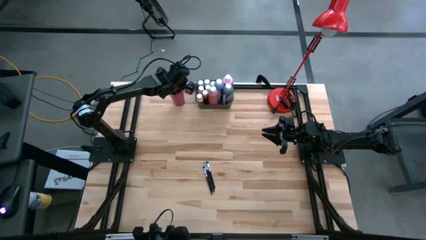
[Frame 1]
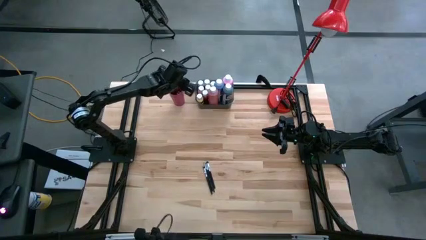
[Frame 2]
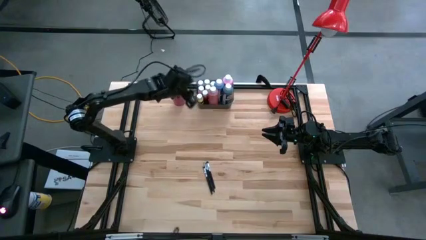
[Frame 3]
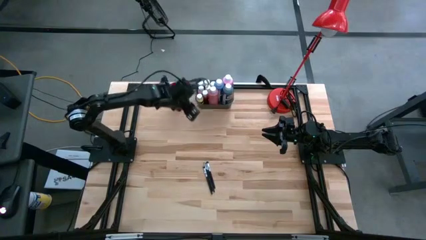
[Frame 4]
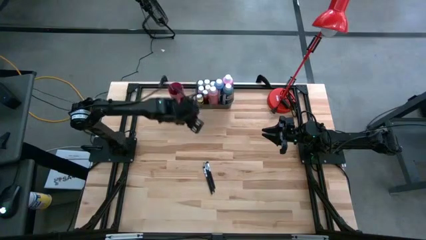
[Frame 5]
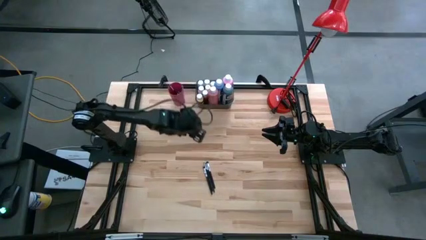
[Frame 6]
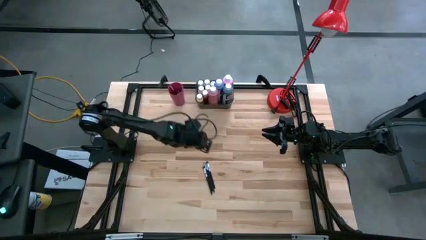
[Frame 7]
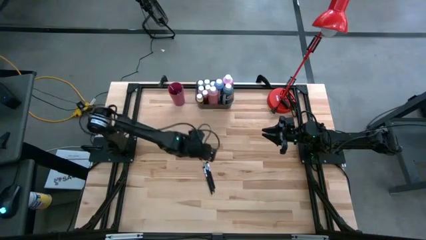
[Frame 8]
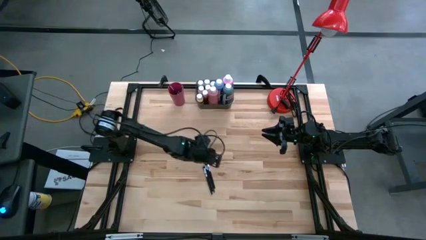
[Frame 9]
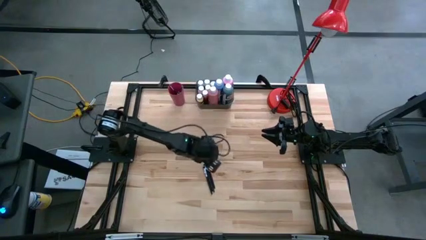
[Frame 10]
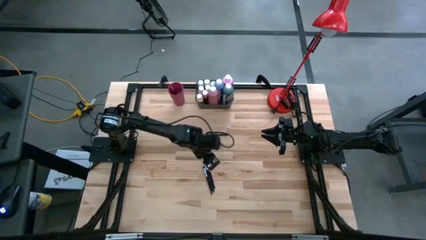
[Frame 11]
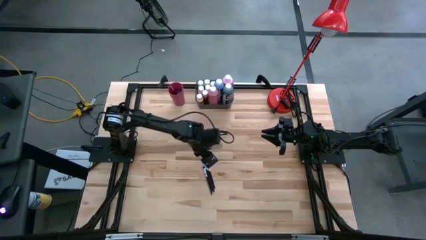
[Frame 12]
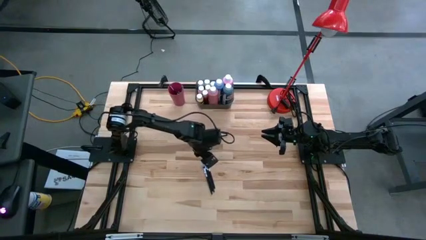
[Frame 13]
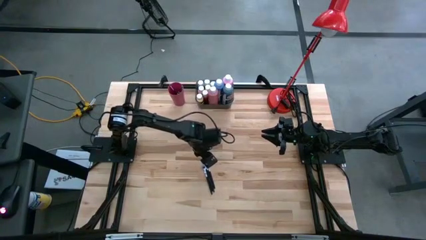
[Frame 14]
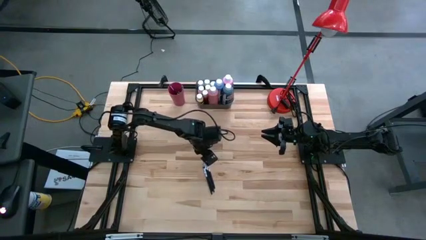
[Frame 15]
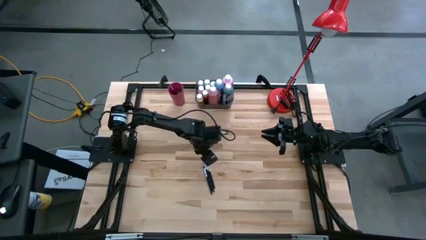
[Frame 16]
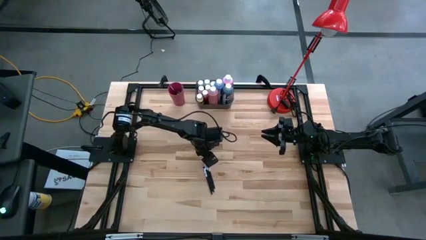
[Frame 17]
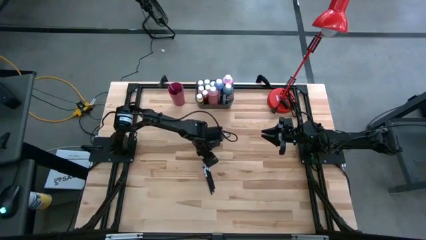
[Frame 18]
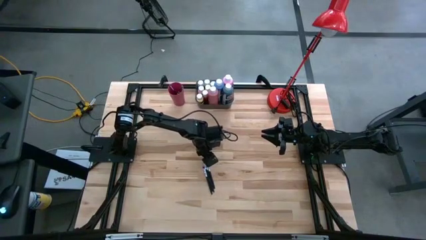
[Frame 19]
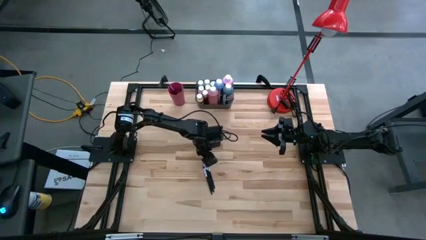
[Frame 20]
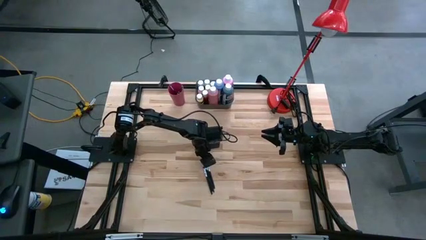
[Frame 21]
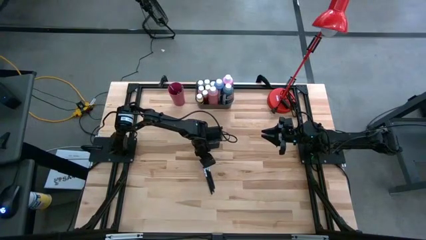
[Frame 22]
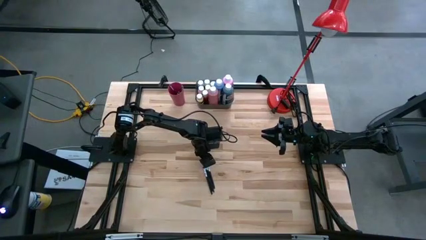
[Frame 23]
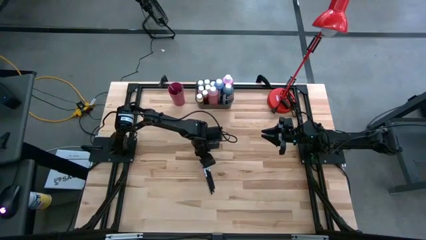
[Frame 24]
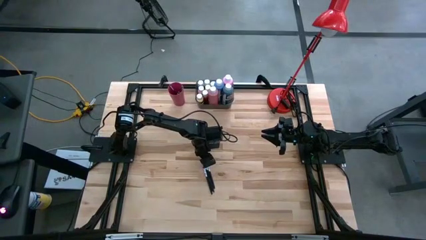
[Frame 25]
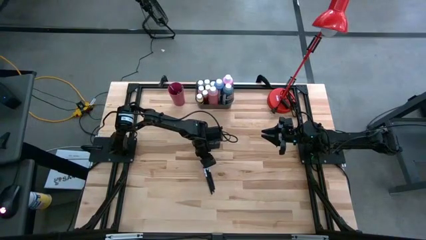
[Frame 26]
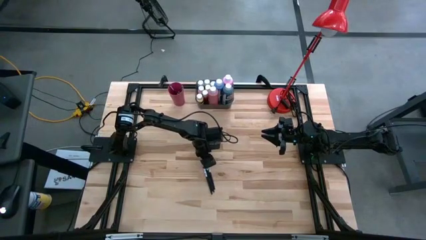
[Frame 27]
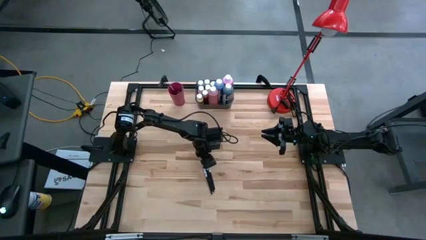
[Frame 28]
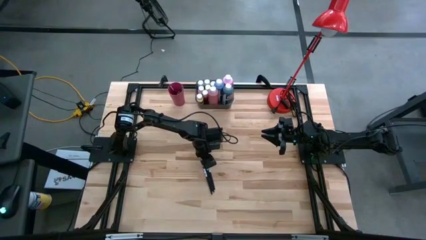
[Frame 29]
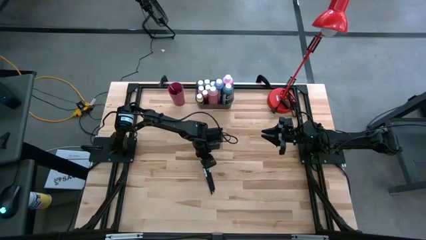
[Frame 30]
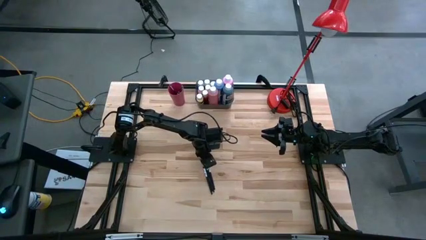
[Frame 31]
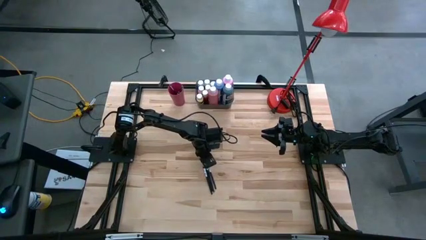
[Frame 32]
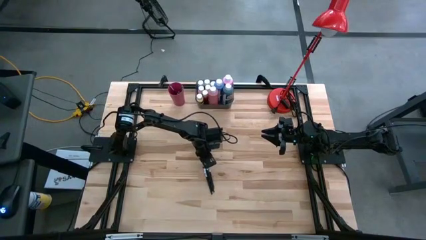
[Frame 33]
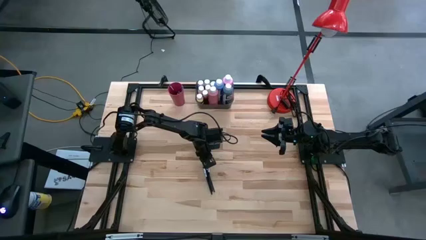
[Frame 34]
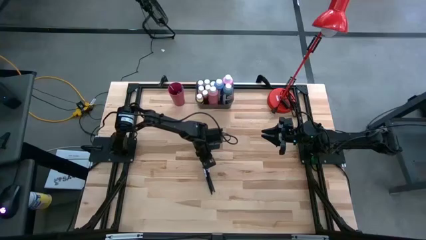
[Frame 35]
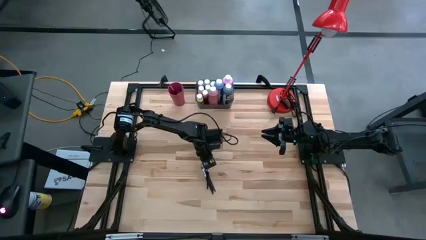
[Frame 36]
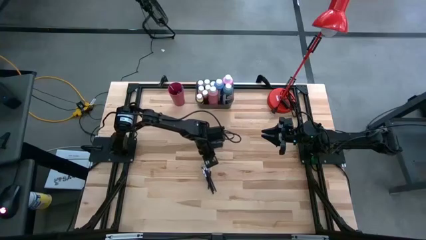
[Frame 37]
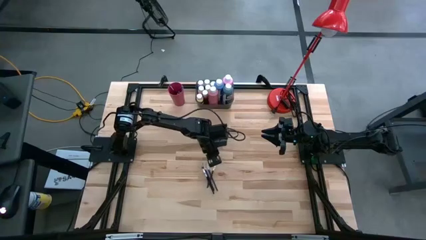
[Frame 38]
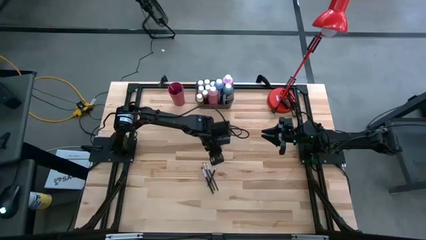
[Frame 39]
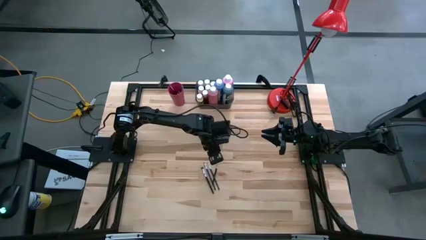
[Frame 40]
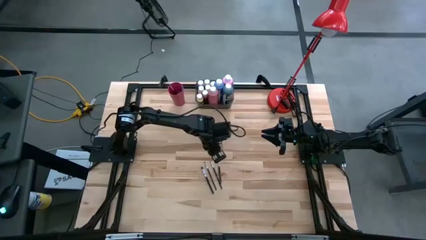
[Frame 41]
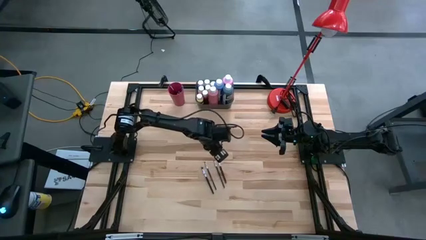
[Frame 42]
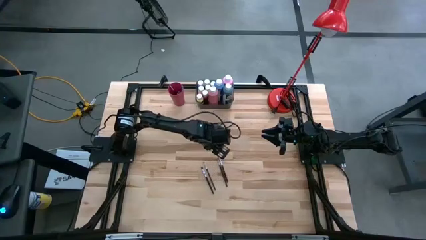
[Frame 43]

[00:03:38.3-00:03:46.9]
Task: Pick & Place Paint Supplies
Put the black paint brush into the pink cup

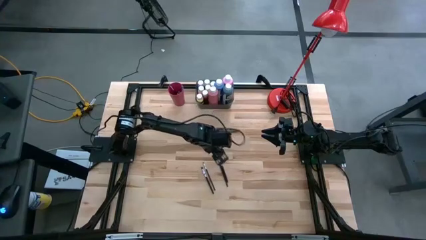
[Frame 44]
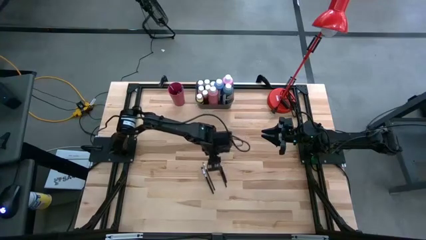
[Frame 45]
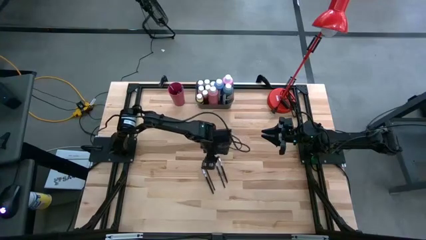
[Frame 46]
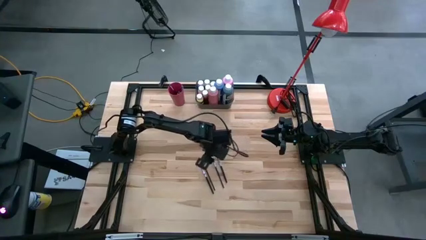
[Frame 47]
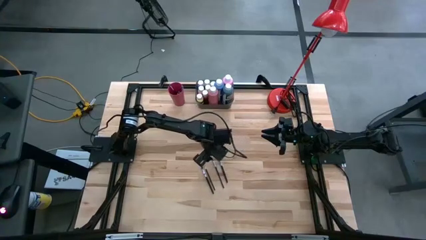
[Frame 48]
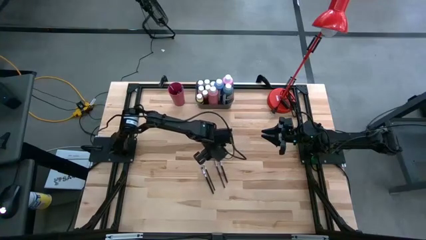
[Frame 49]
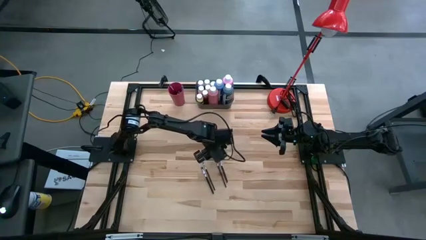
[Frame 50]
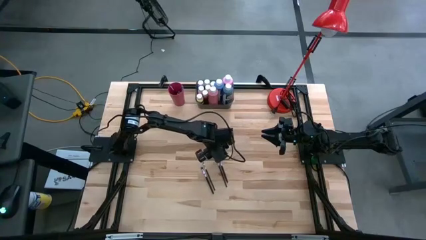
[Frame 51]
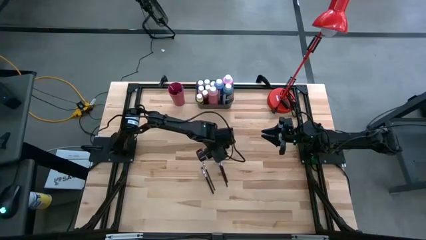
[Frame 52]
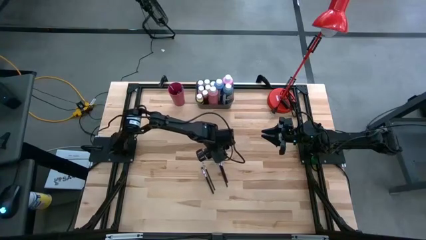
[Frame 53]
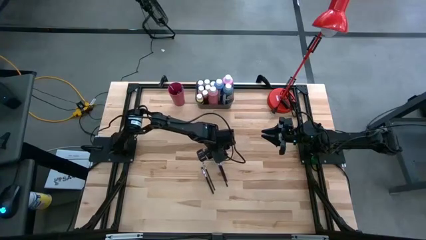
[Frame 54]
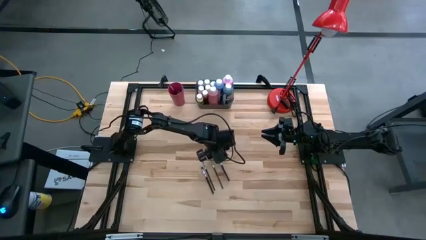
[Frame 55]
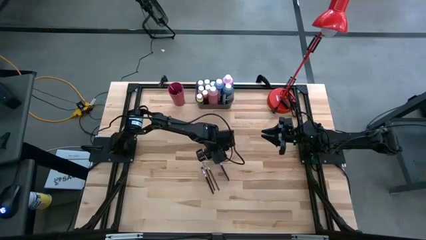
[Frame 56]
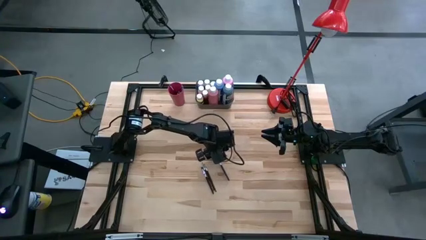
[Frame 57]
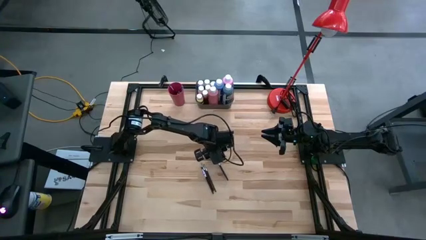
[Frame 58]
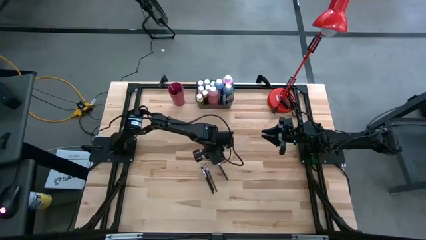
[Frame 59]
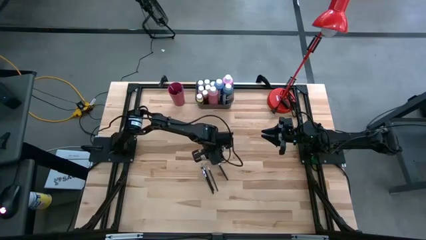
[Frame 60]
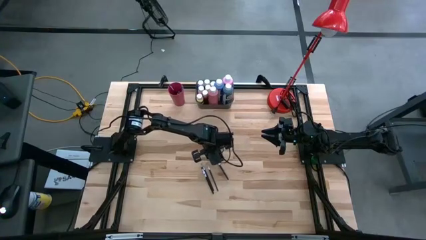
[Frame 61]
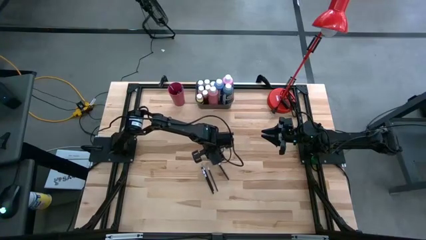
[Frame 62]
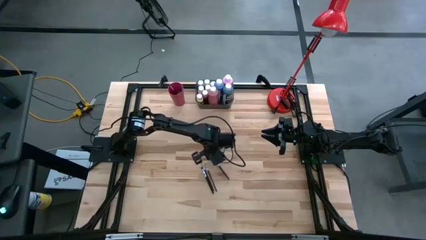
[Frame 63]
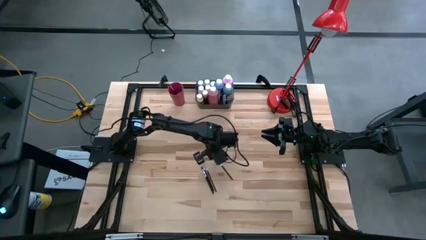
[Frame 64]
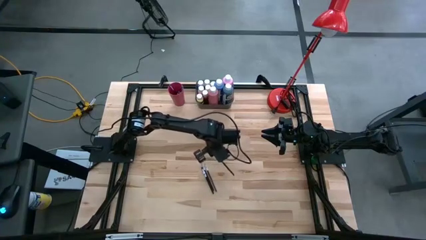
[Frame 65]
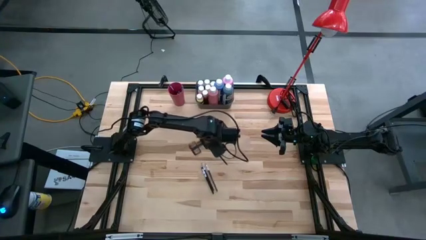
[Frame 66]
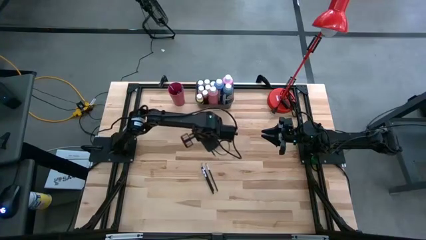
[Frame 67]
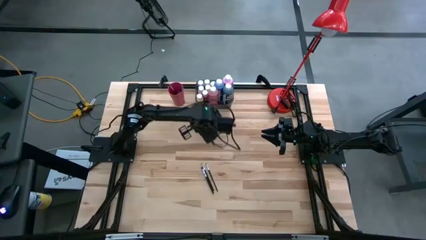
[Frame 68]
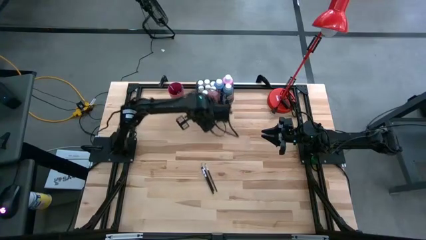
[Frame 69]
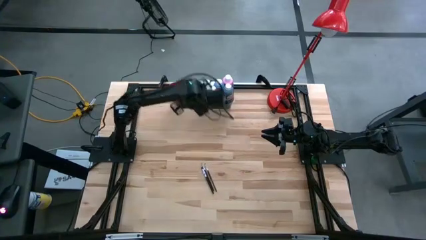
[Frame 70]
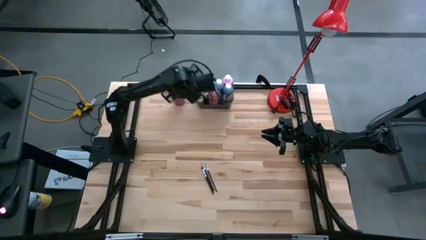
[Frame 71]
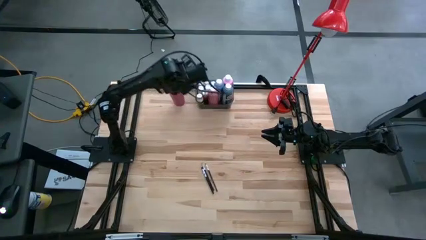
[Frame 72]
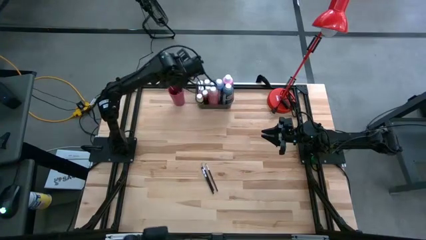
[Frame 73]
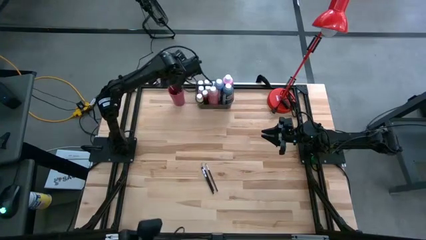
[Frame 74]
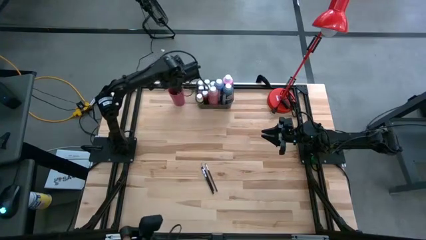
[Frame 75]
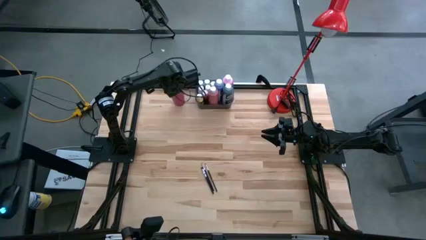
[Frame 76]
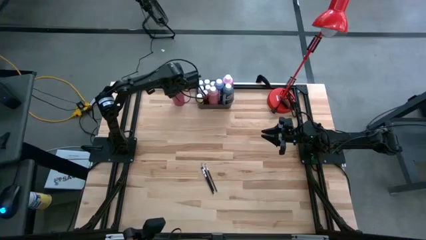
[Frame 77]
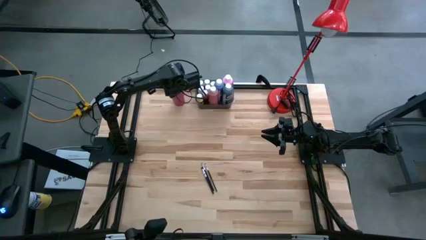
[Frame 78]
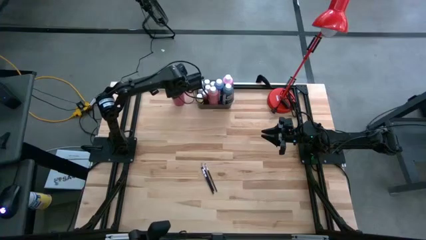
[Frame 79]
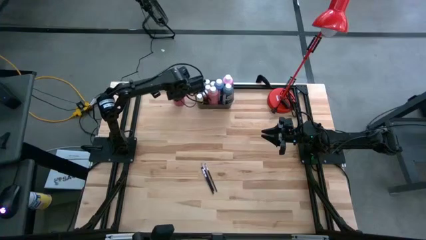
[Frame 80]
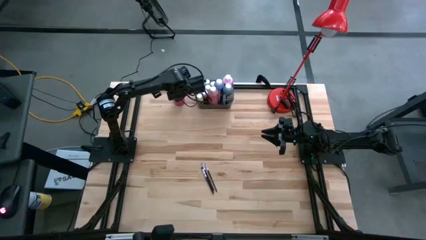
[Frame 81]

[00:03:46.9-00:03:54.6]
Put the black paint brush into the pink cup
